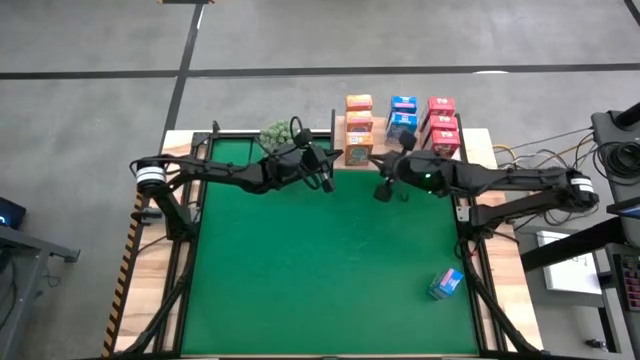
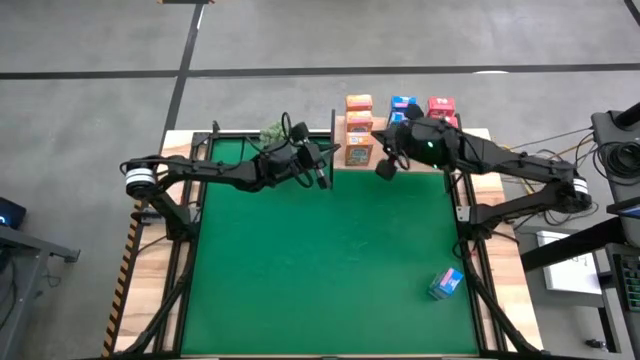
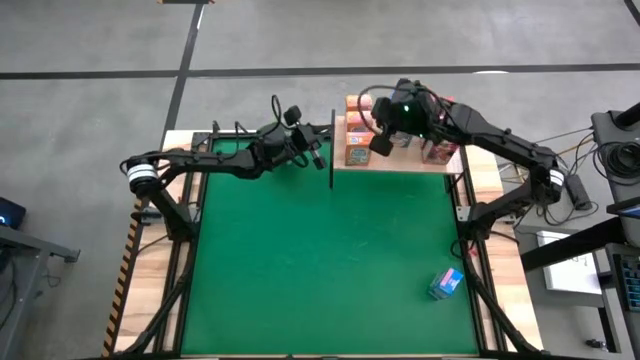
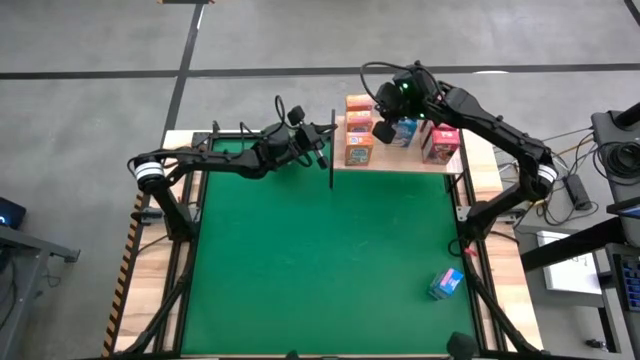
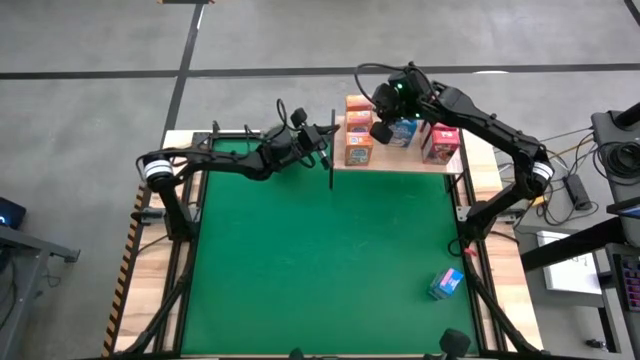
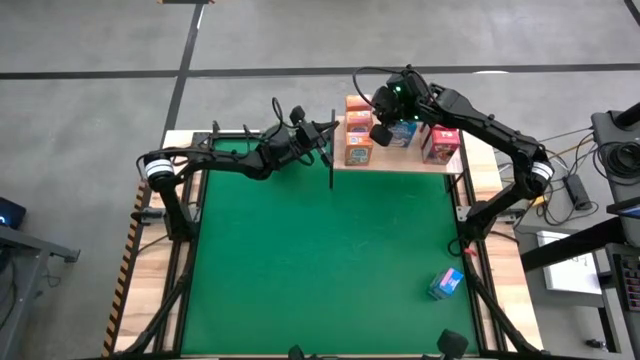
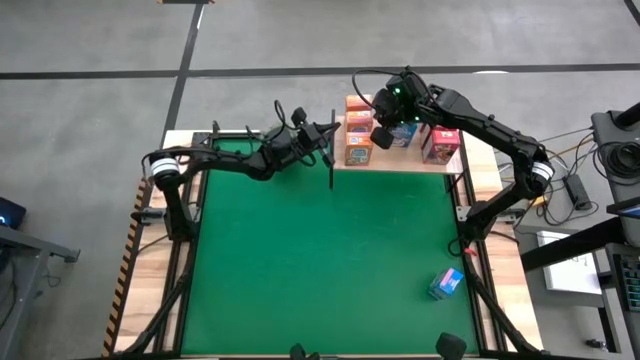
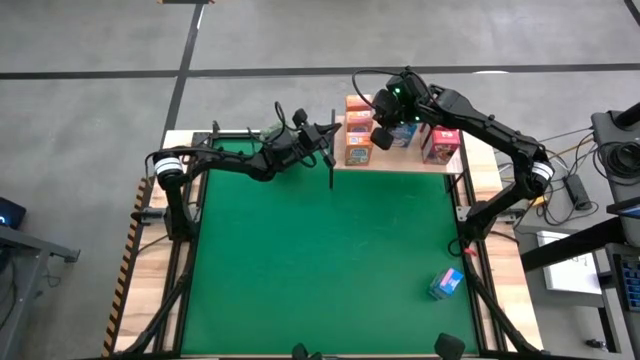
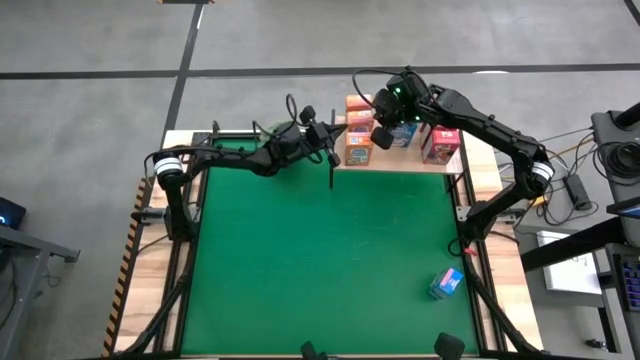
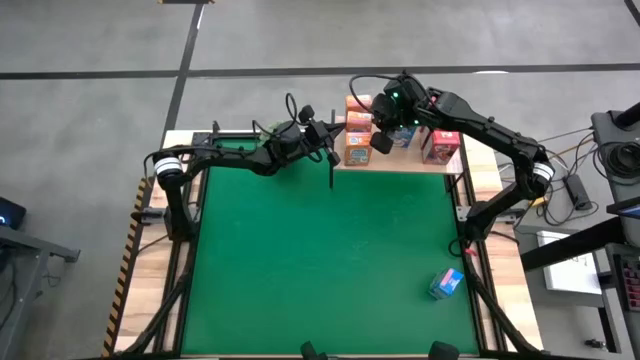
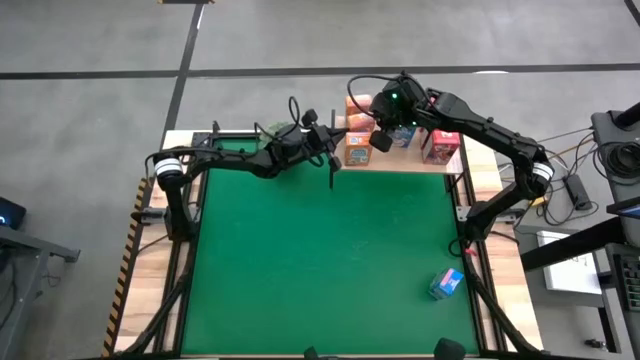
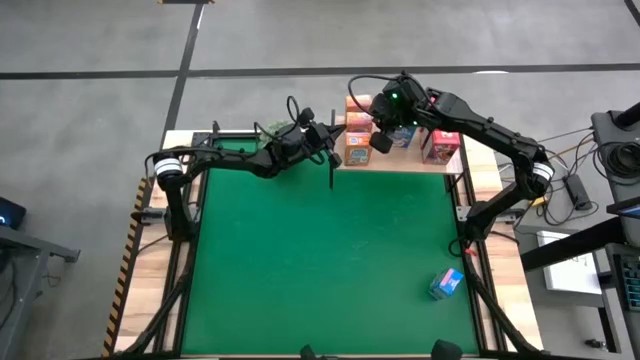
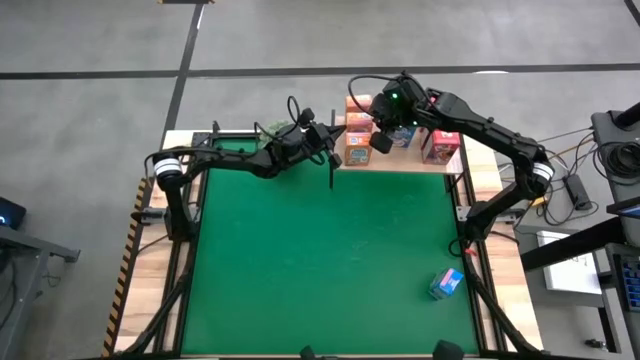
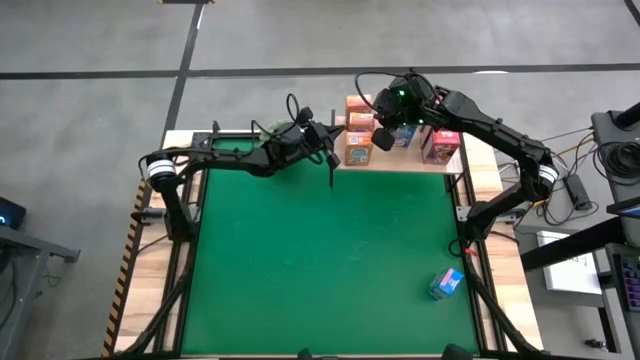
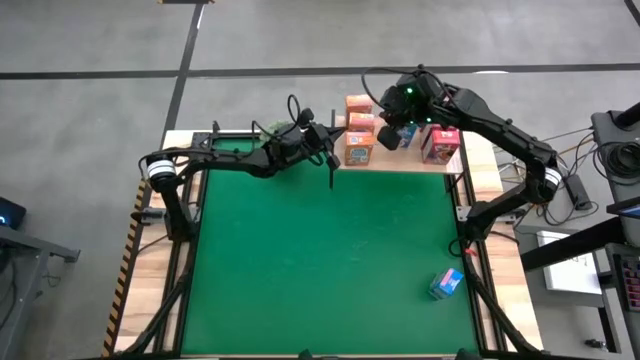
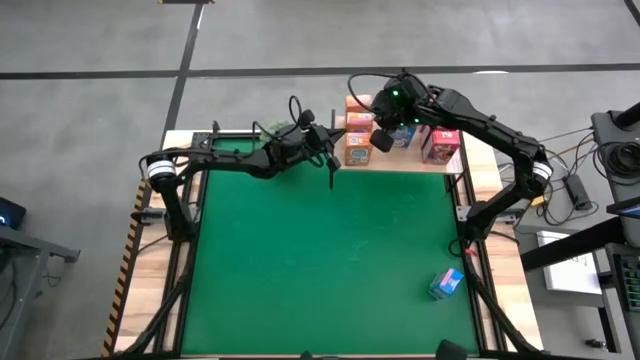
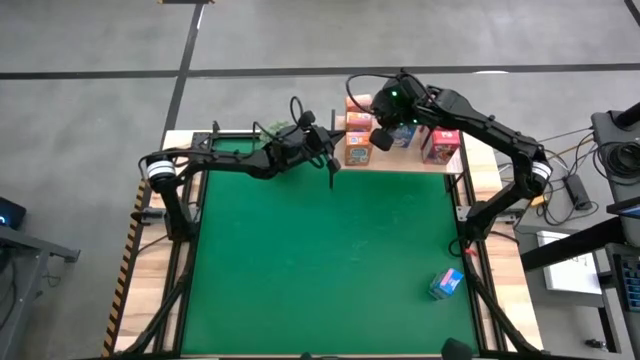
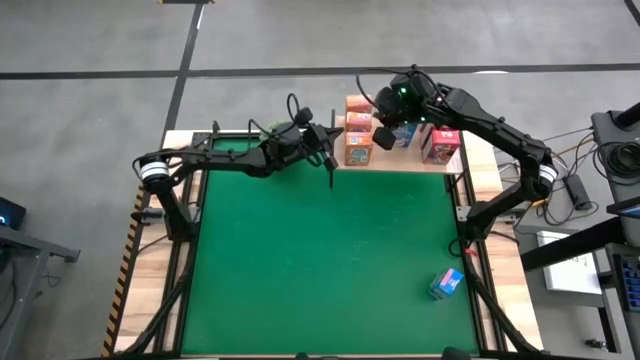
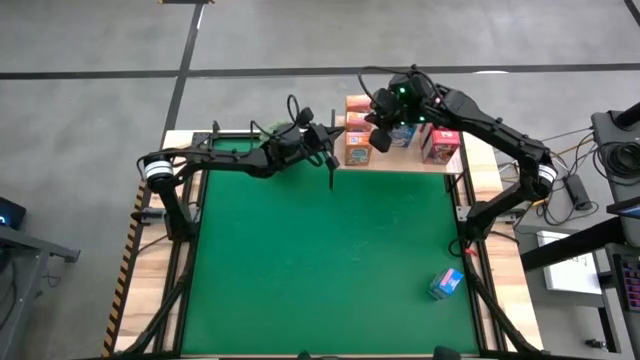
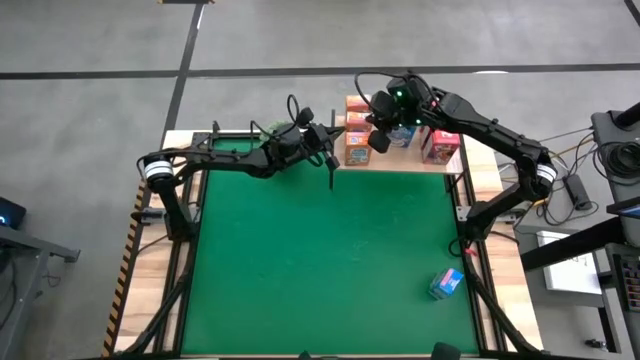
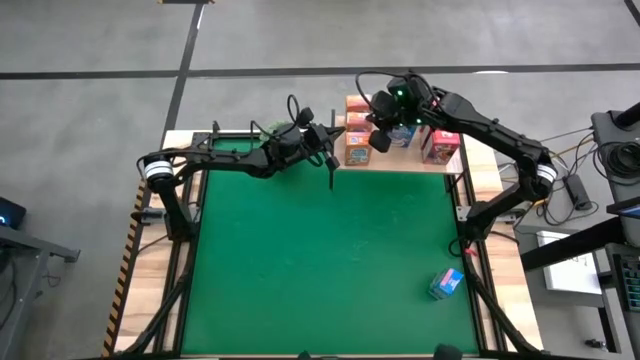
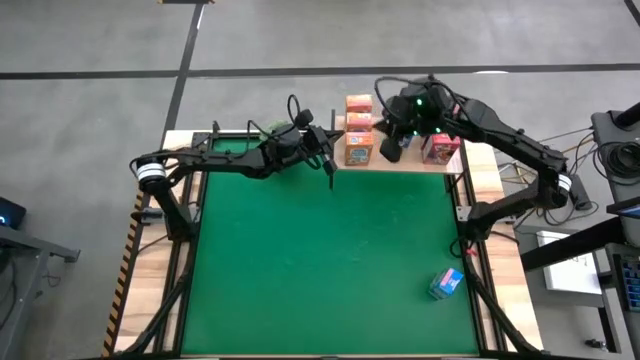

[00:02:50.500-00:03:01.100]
Task: Stack cereal on shelf
Adjust the orange cereal box on the shelf

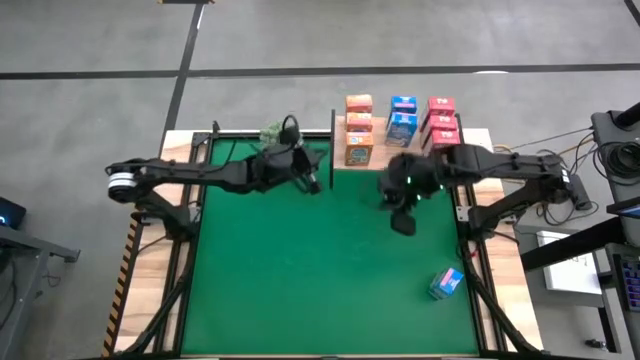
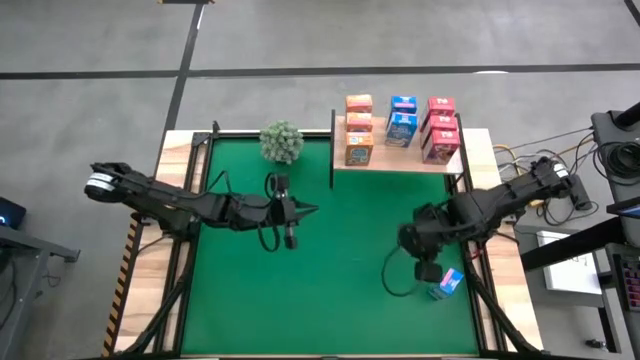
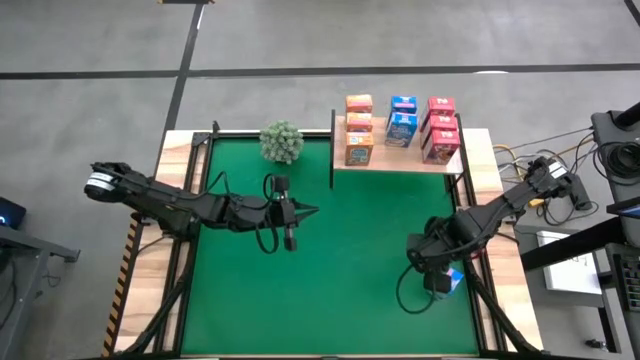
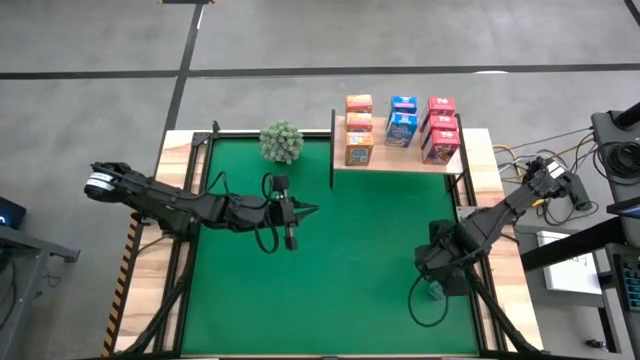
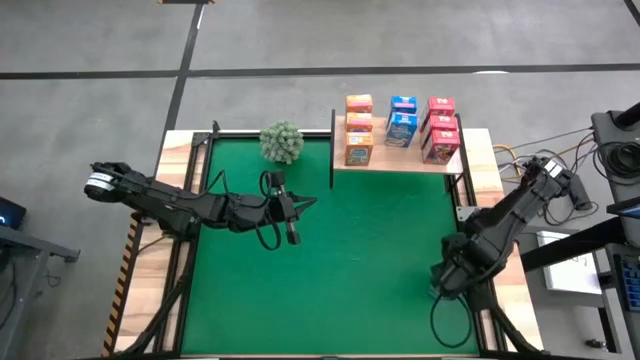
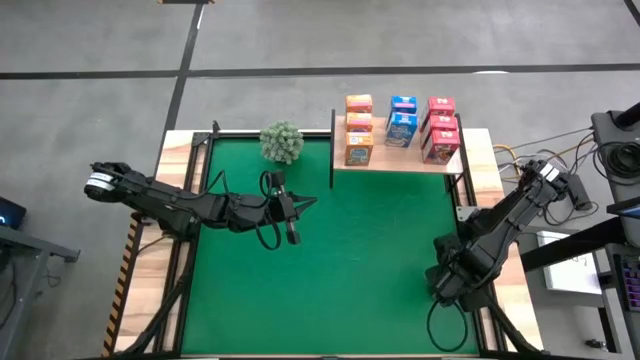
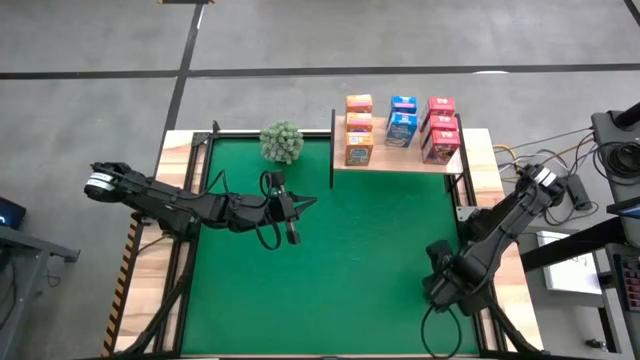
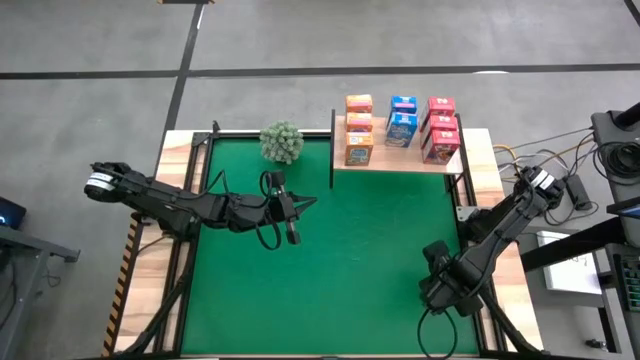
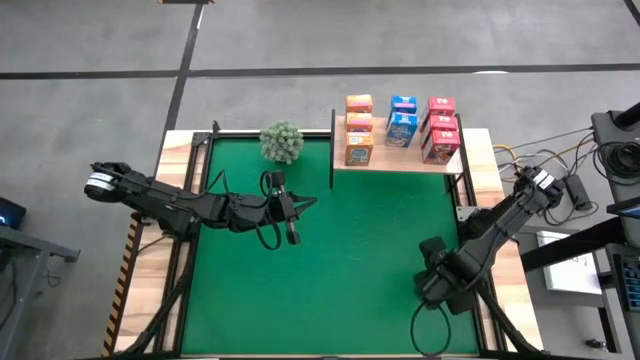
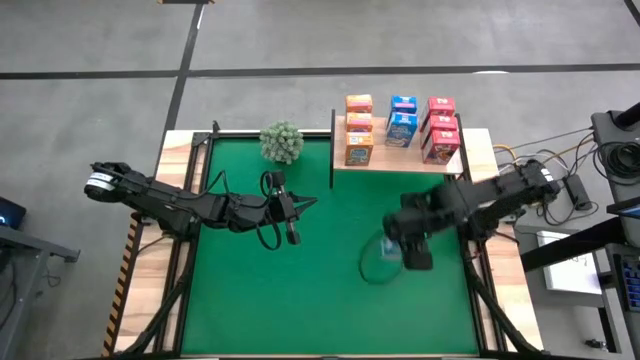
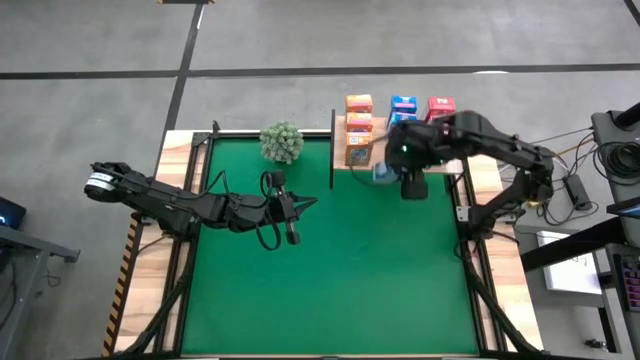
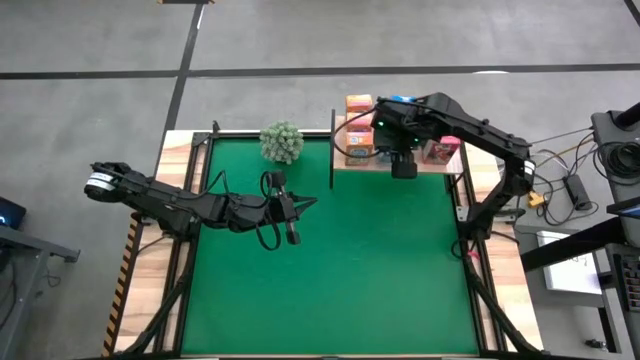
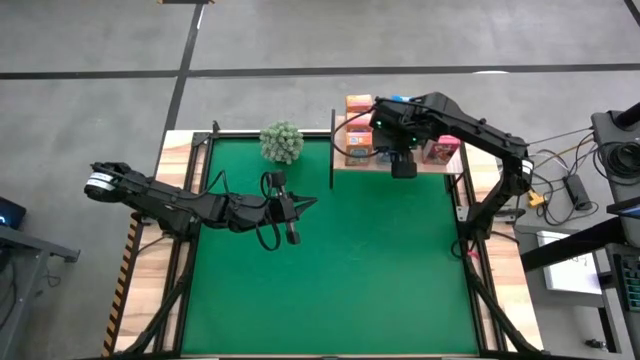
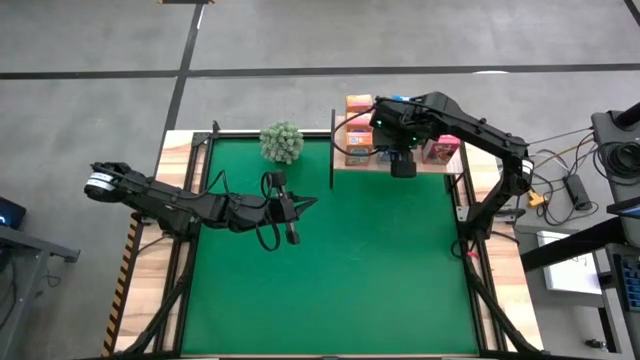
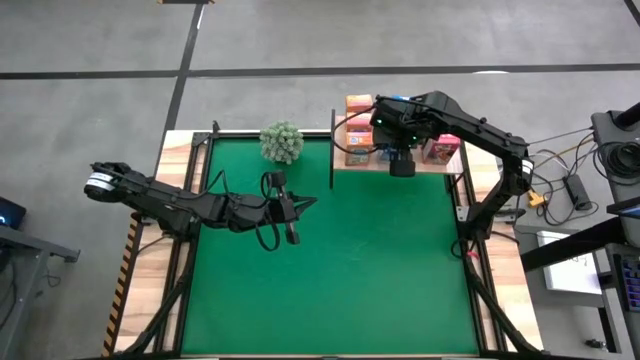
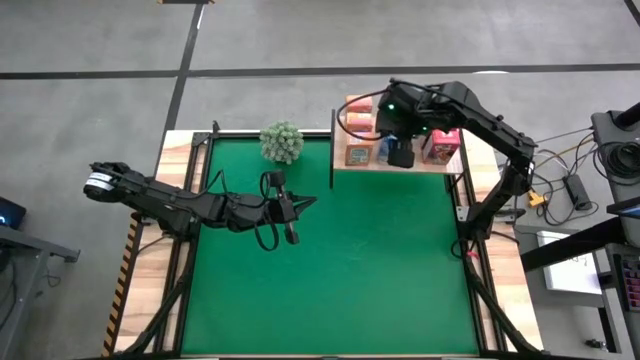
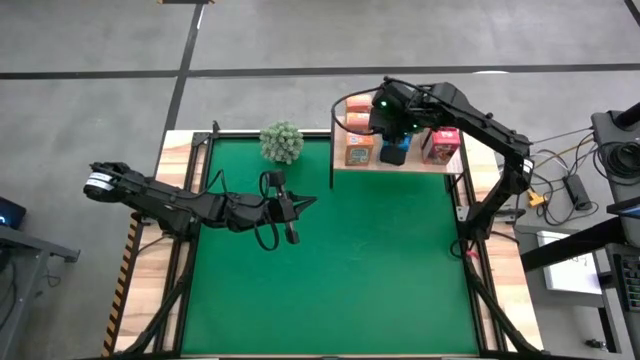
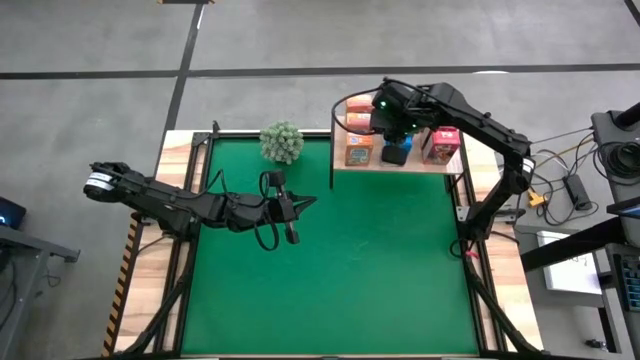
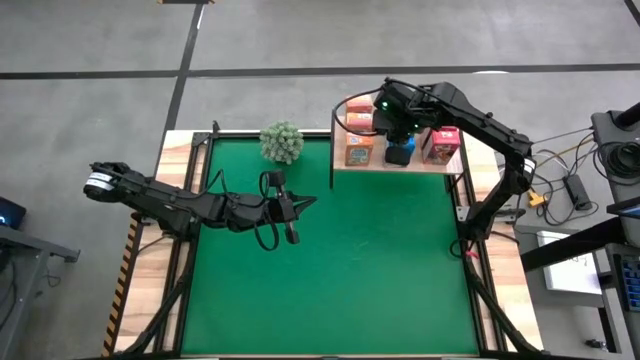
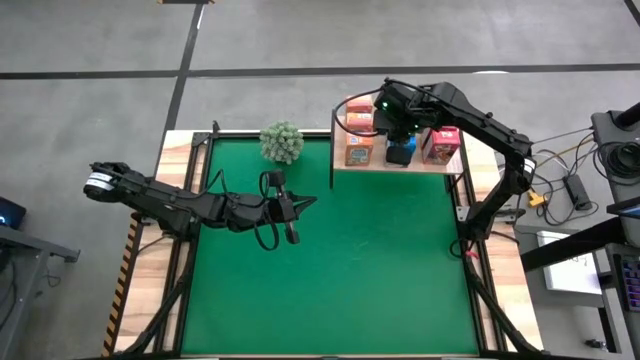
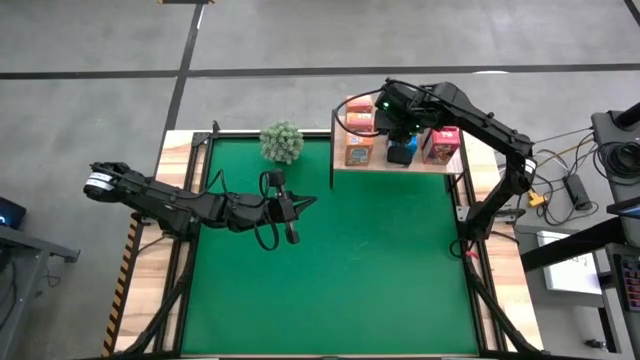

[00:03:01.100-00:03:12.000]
Put the blue cereal box on the shelf
